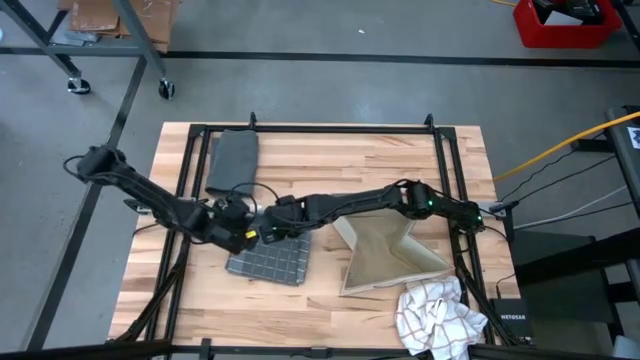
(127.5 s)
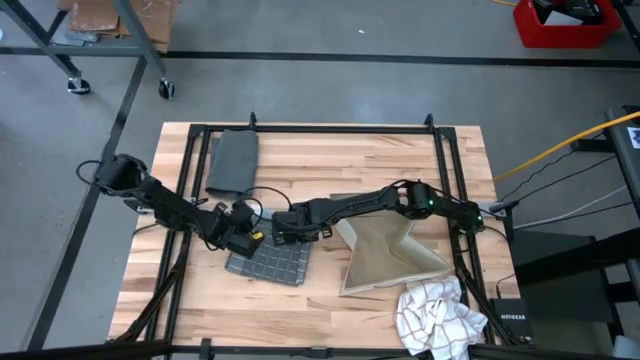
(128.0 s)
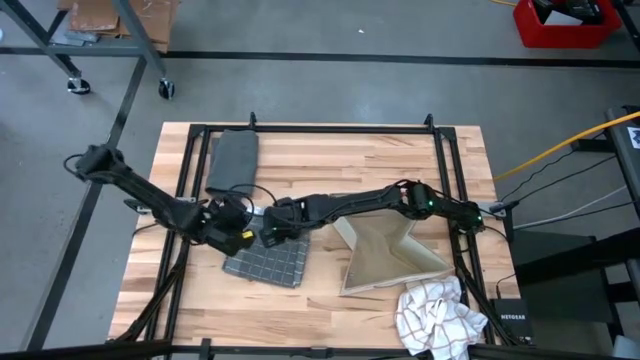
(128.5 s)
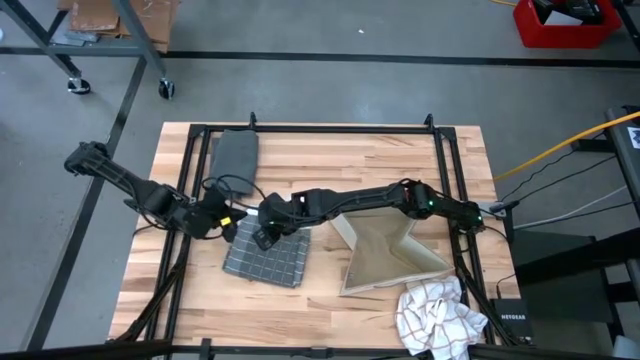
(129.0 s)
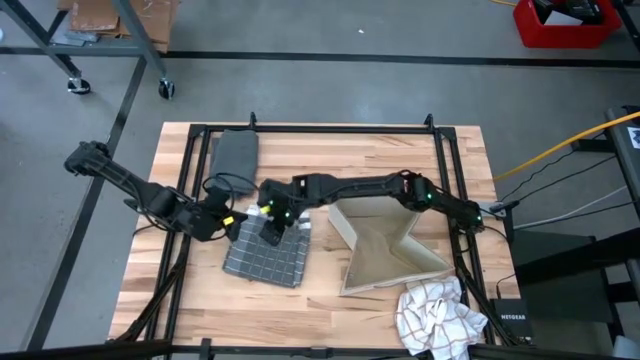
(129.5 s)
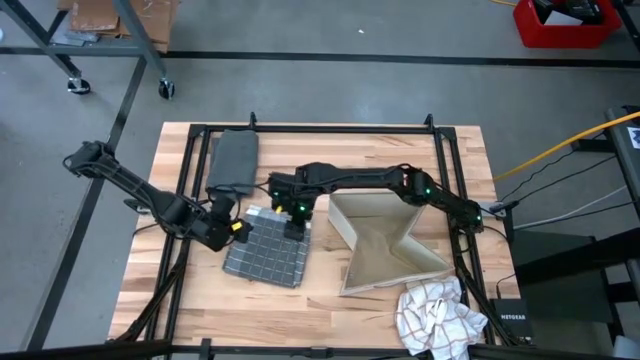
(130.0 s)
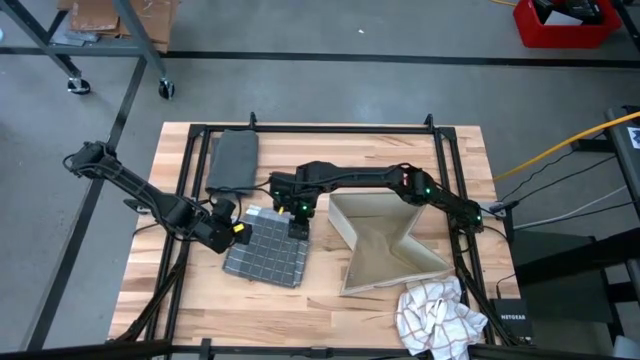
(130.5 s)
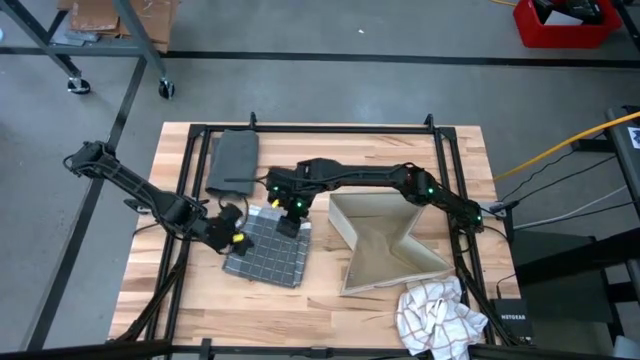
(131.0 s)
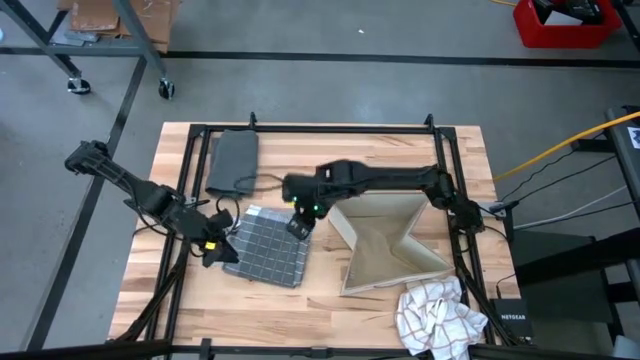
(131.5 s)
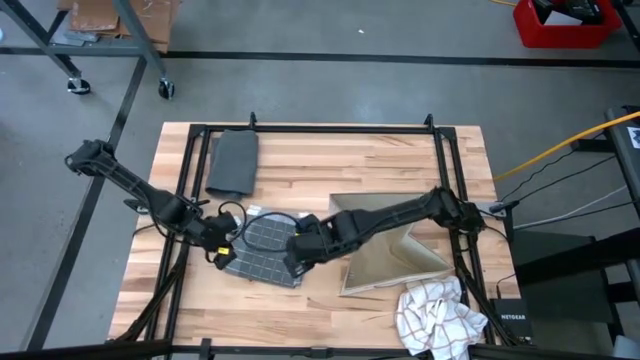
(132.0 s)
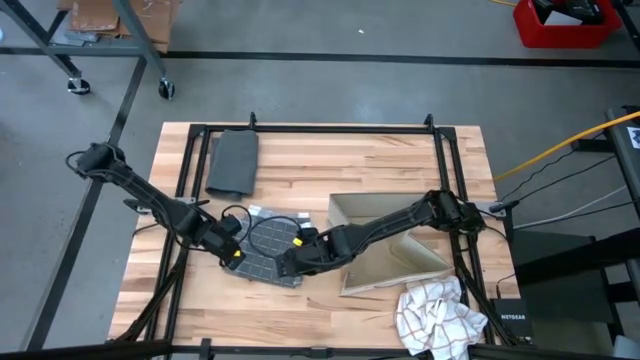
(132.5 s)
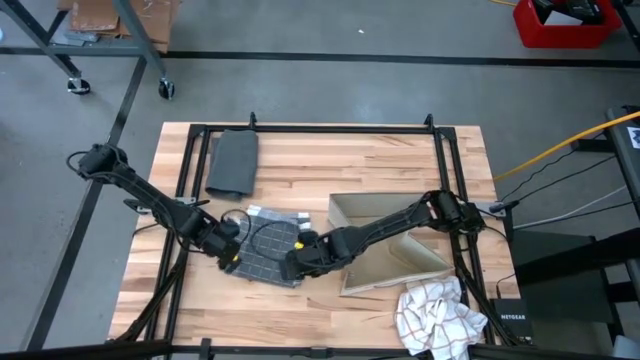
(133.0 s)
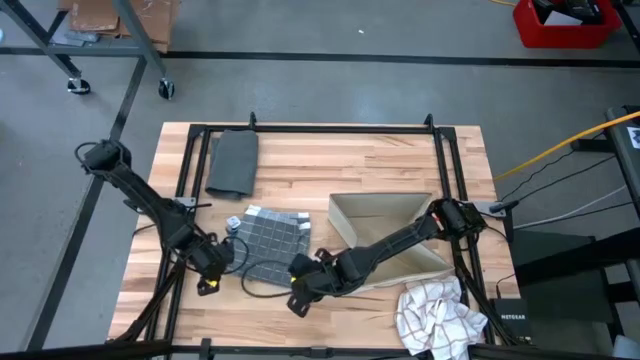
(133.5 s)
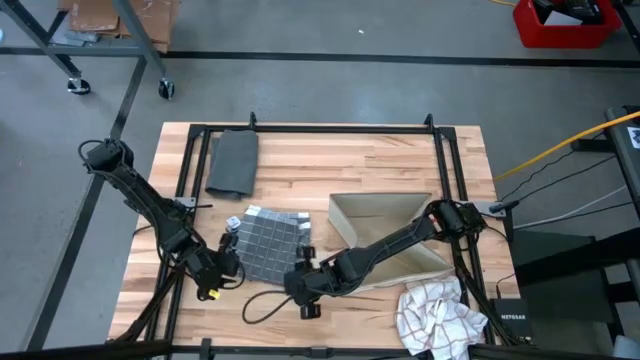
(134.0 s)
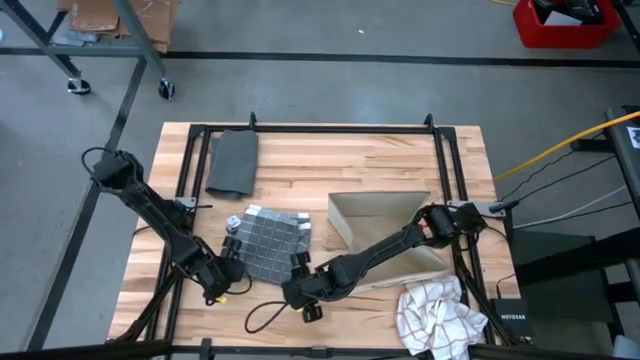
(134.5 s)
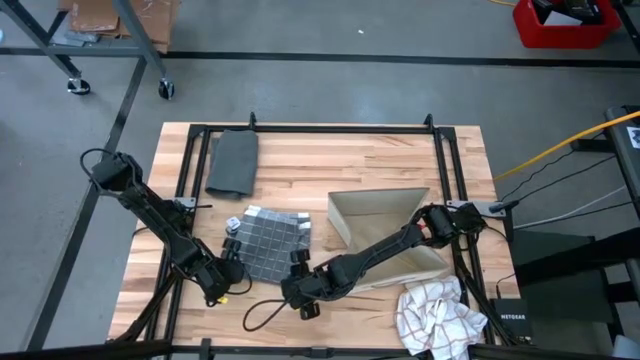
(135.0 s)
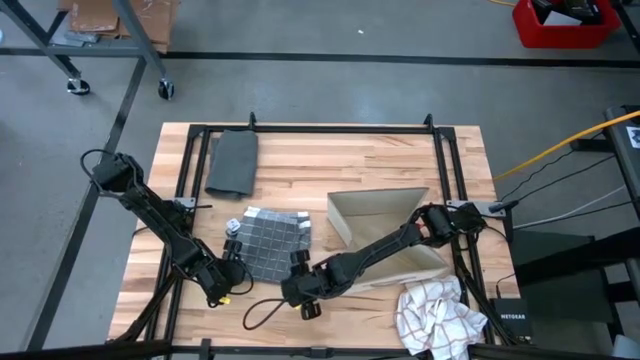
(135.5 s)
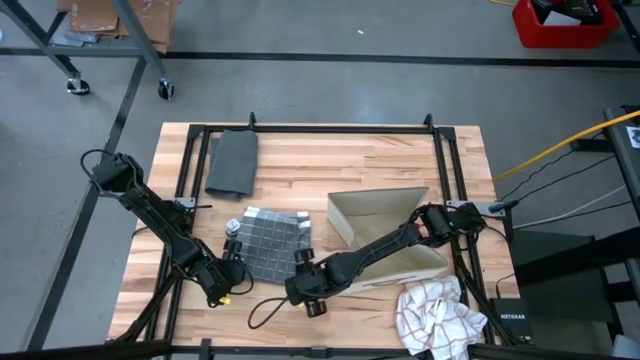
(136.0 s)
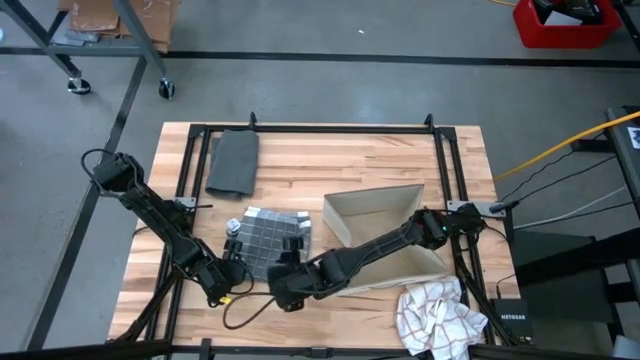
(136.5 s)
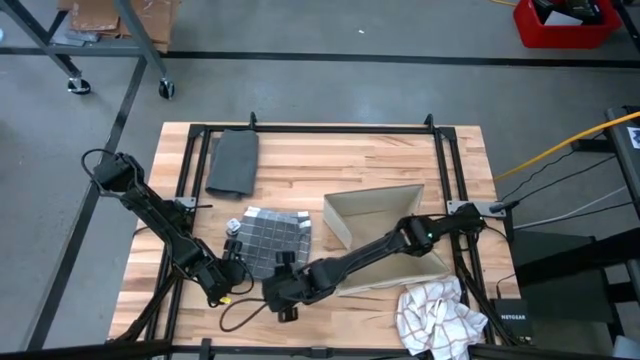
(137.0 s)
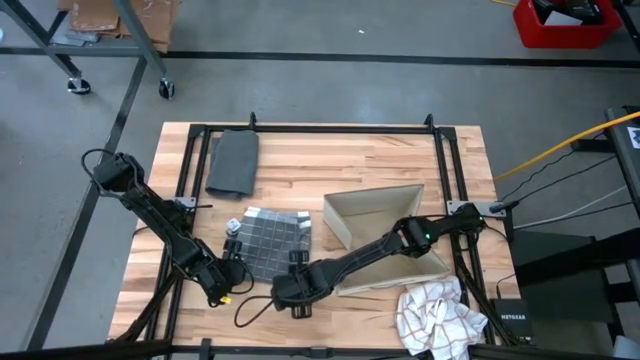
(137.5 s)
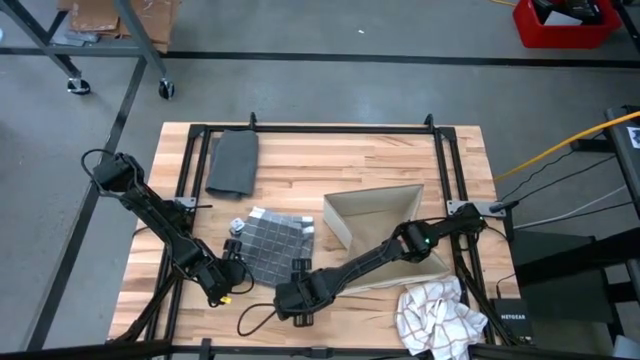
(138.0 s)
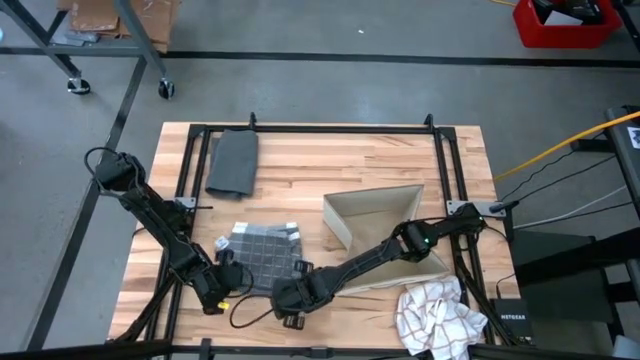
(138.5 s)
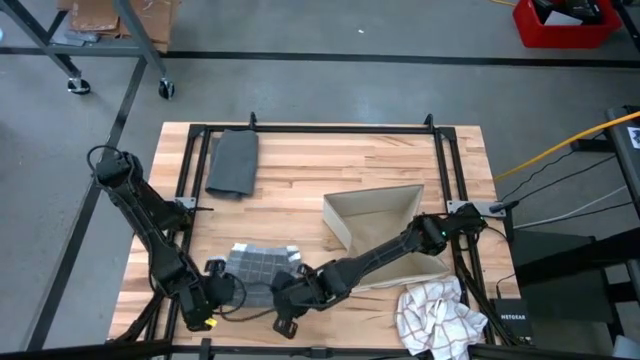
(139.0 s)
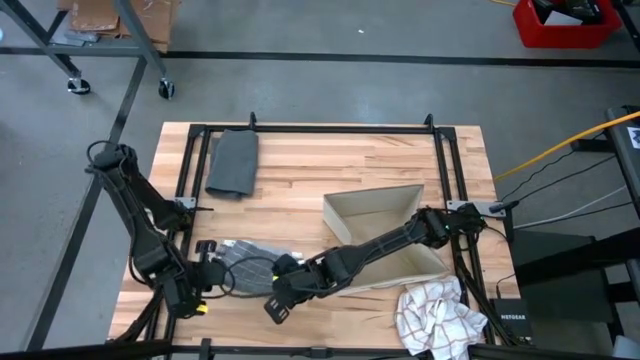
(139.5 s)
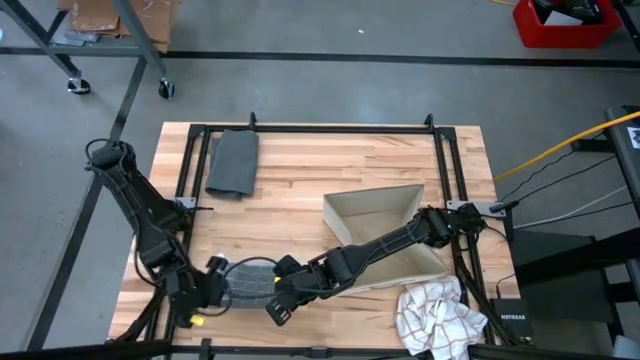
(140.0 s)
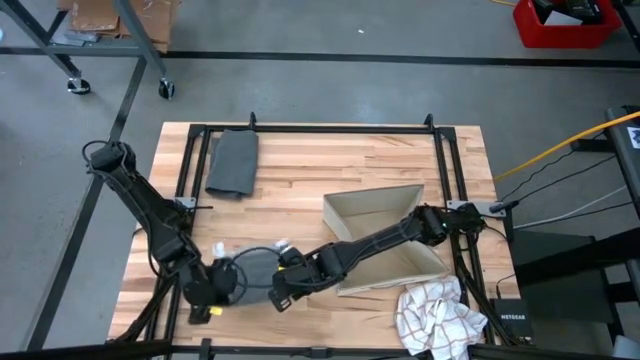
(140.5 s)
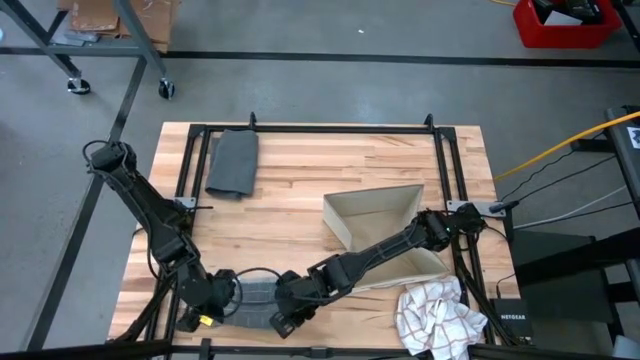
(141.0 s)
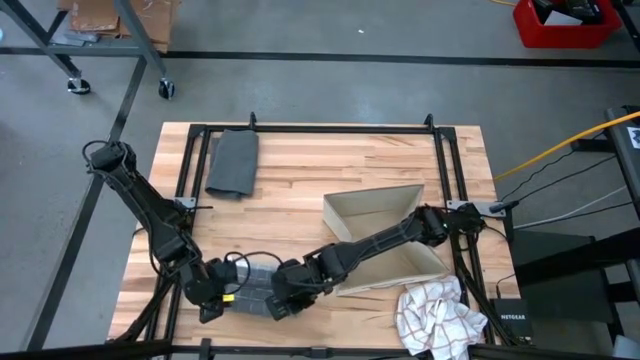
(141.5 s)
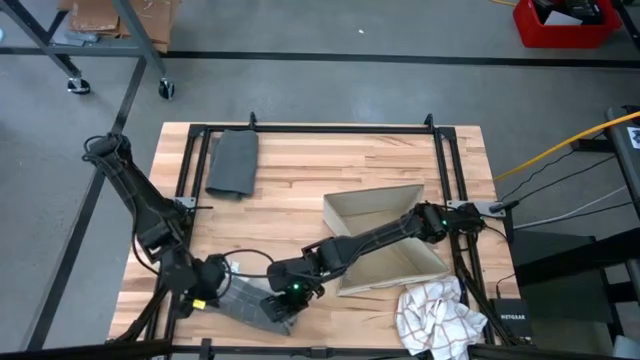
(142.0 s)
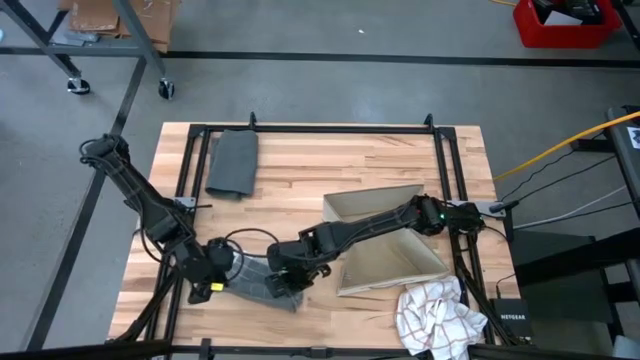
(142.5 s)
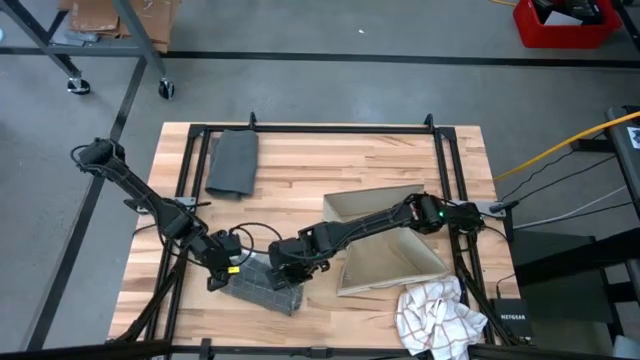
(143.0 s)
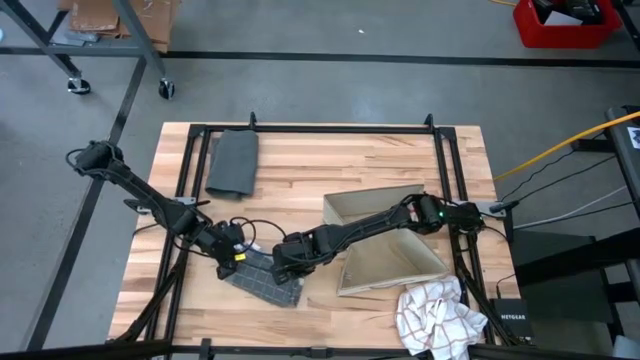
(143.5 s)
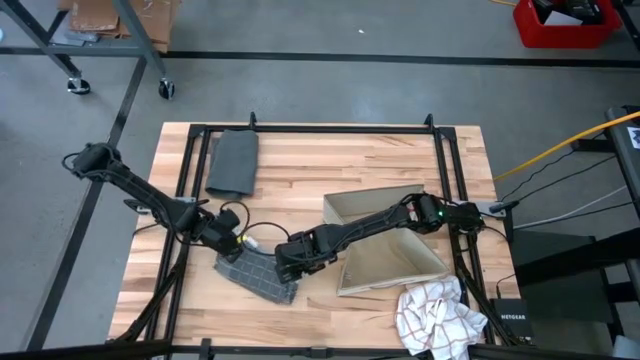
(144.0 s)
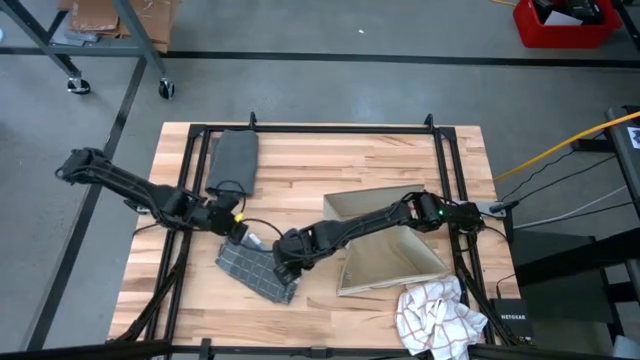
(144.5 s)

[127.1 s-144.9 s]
Task: Fold towel
Fold the gray patterned towel
